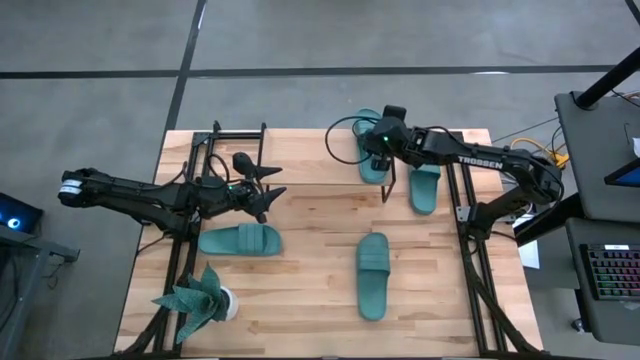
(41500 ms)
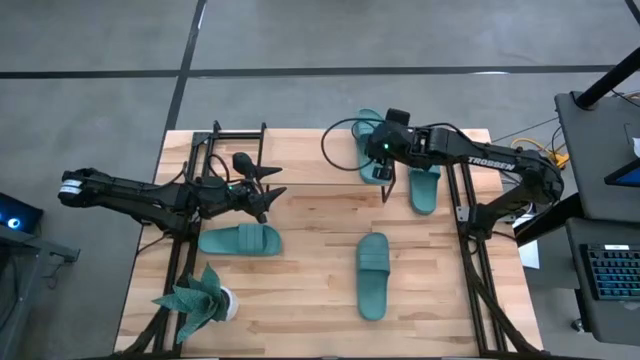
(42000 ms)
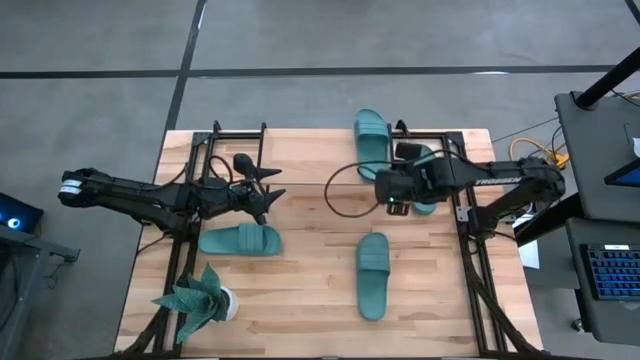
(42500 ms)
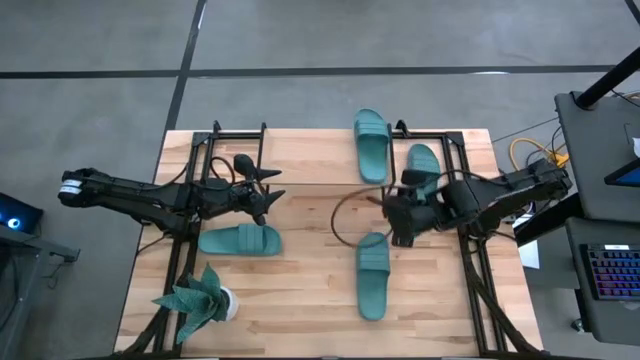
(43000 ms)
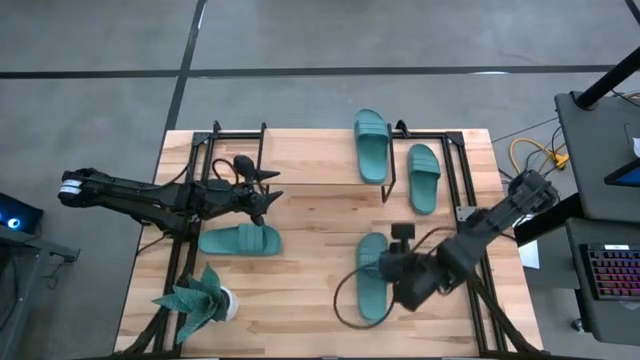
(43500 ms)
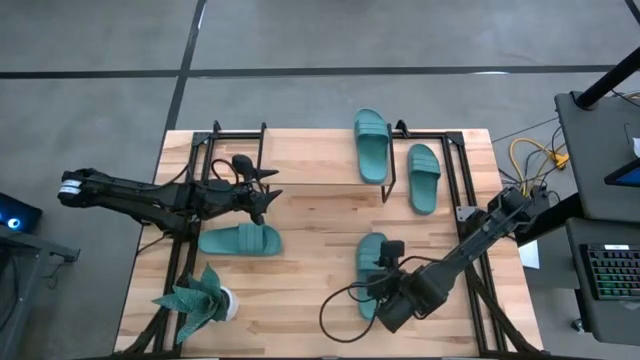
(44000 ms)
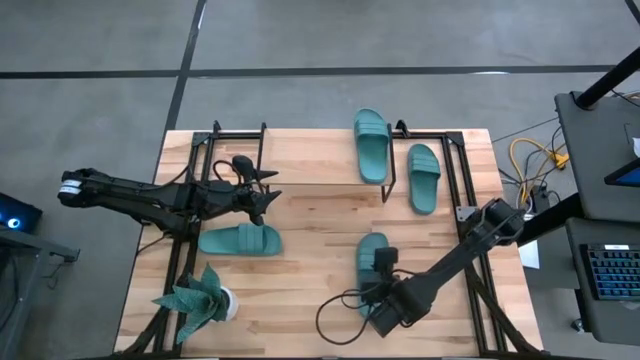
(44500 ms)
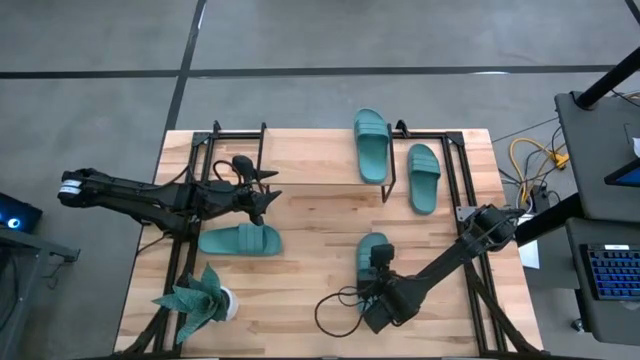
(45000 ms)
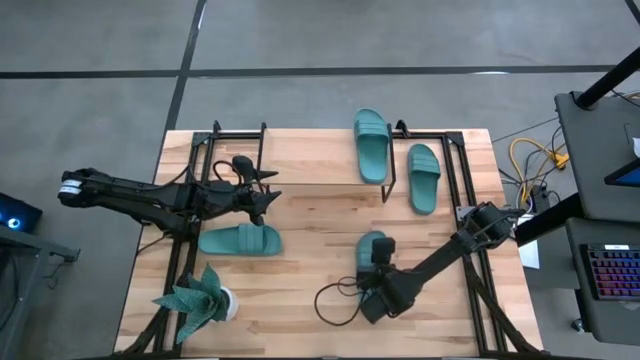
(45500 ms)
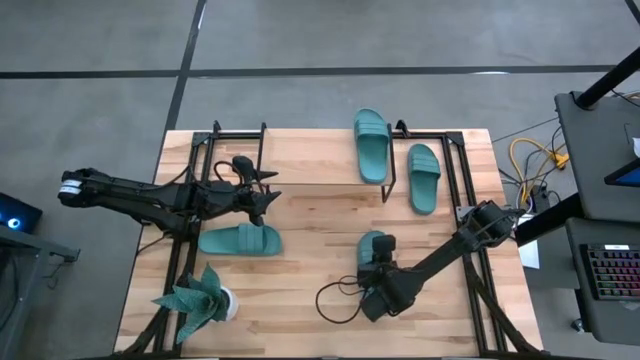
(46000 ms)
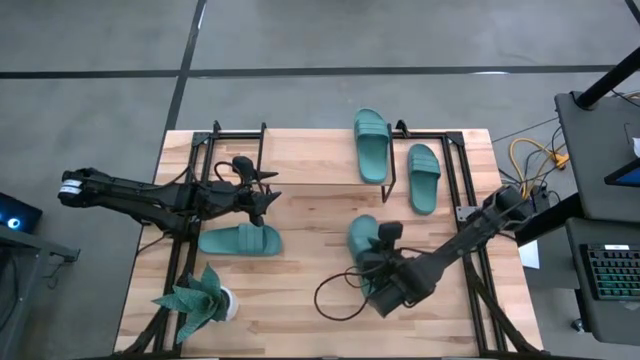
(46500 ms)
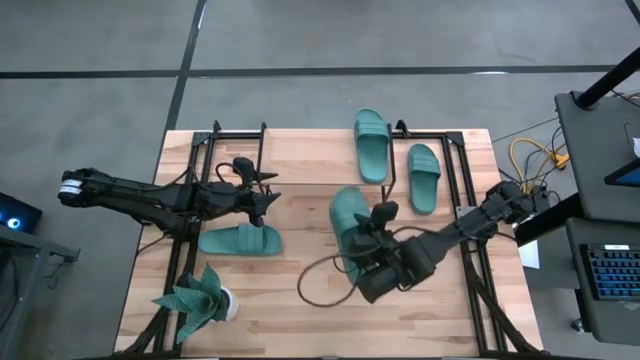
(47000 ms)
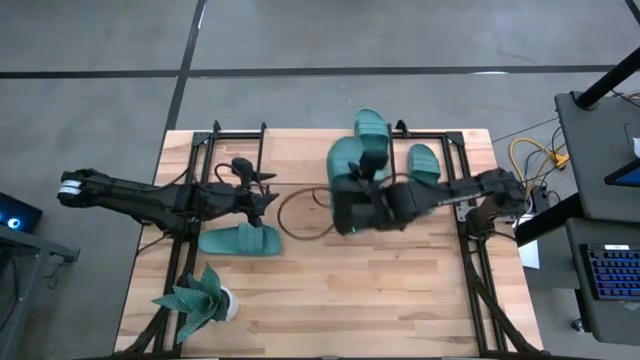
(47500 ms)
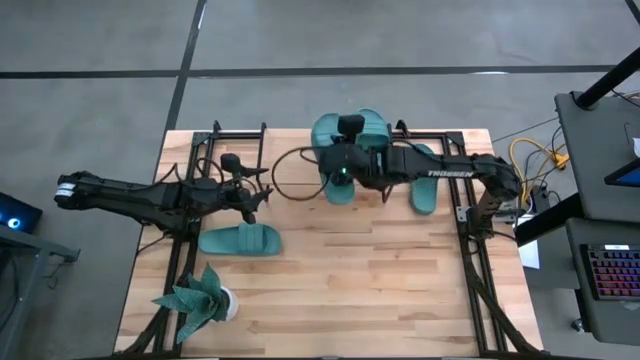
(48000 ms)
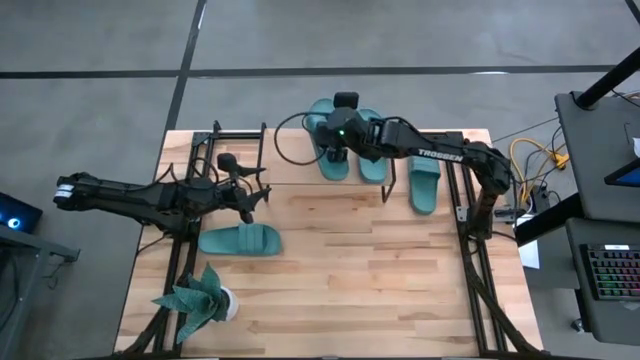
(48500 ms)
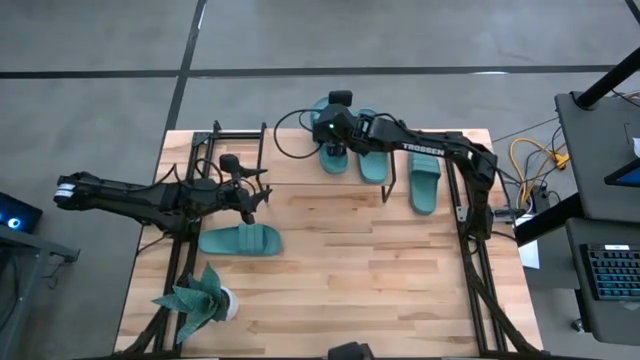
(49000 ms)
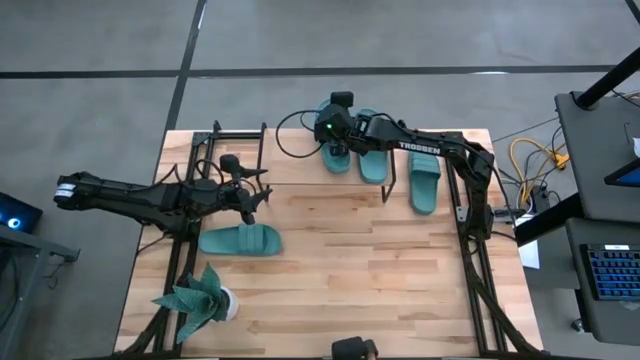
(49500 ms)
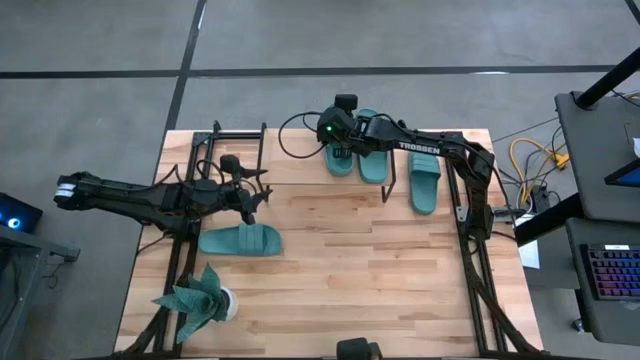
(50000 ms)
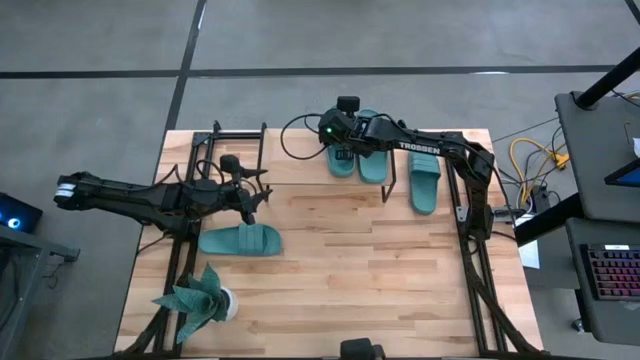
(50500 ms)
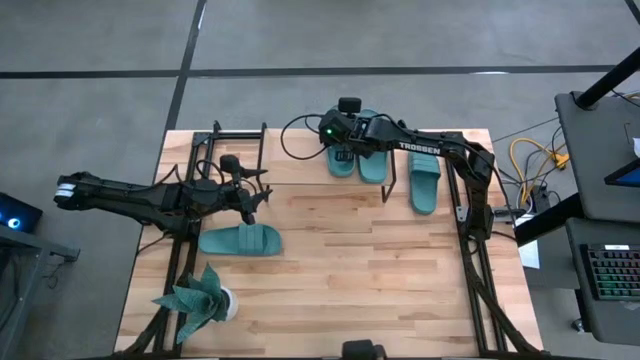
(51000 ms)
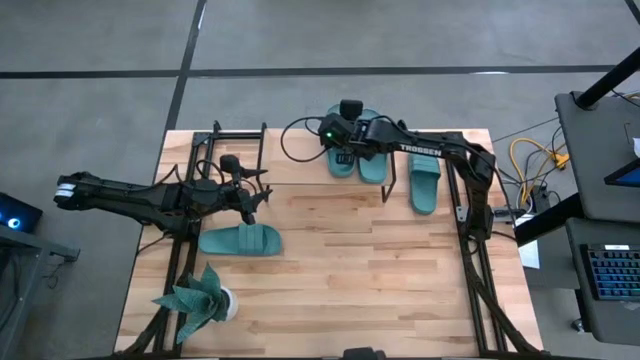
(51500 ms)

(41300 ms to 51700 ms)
Task: Pick and place slides into the shelf
Put the green slide on the shelf

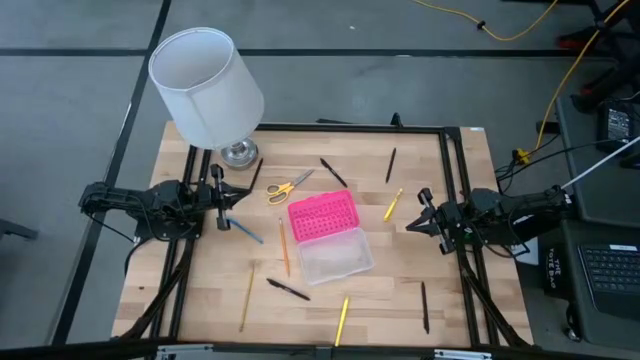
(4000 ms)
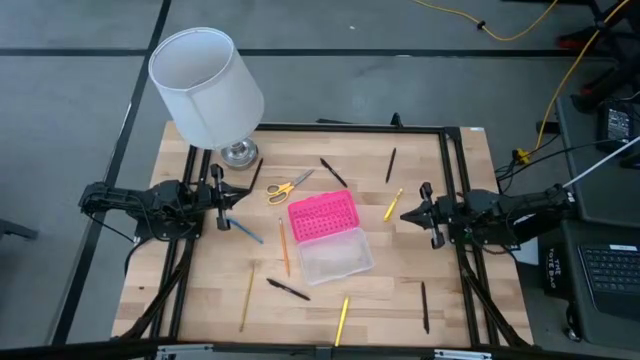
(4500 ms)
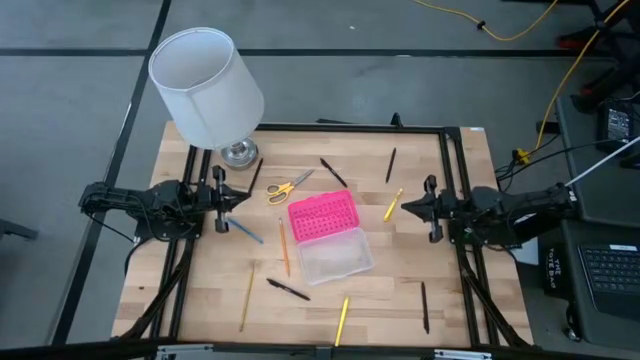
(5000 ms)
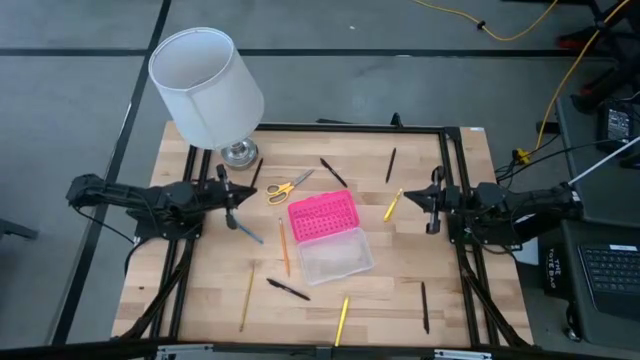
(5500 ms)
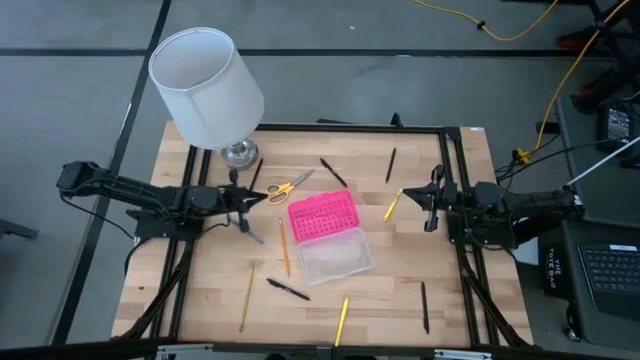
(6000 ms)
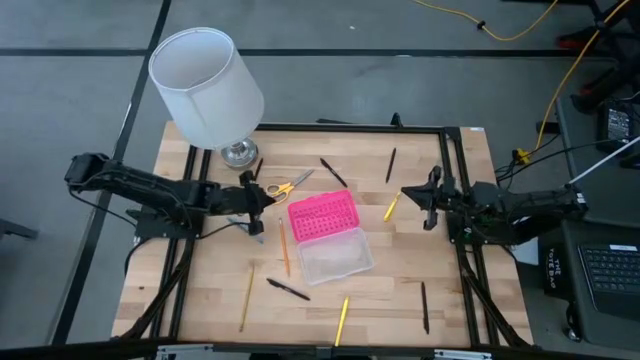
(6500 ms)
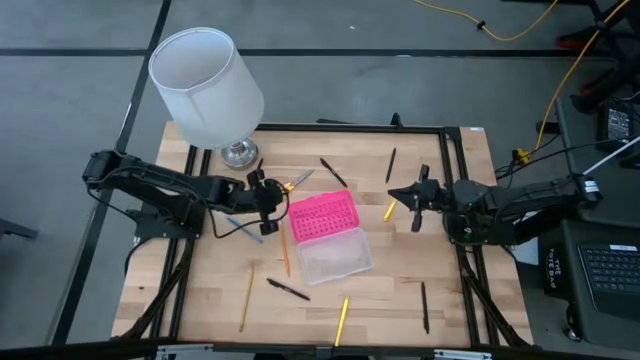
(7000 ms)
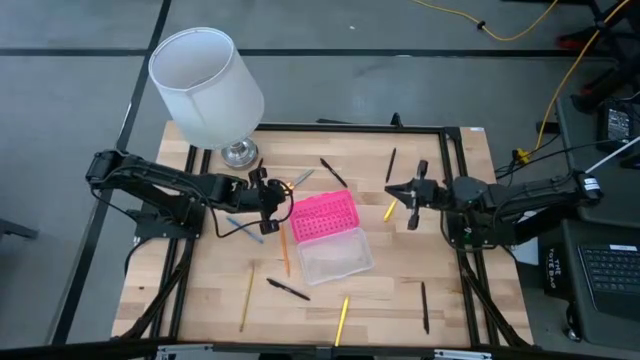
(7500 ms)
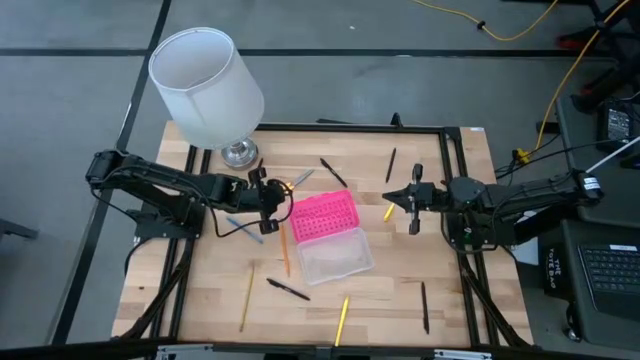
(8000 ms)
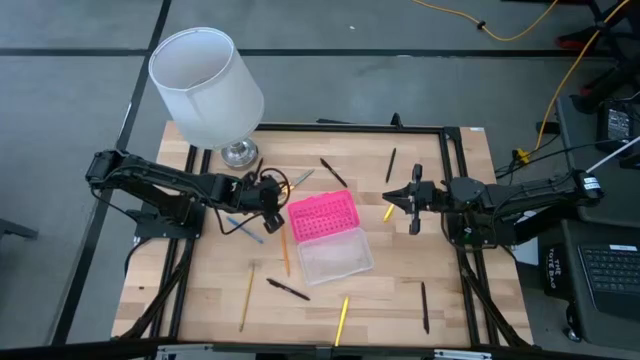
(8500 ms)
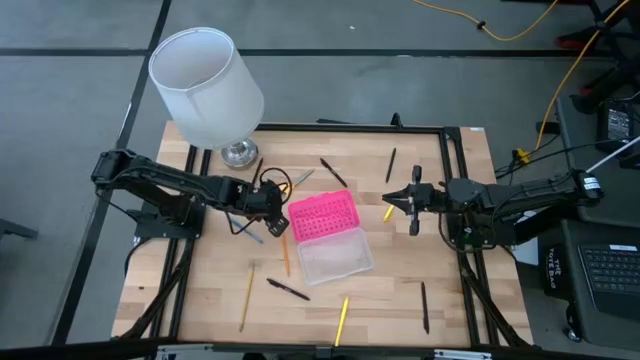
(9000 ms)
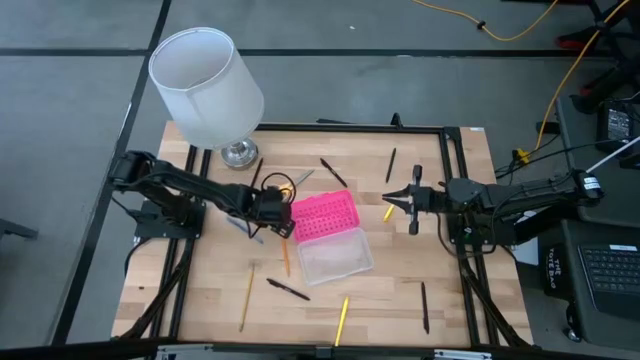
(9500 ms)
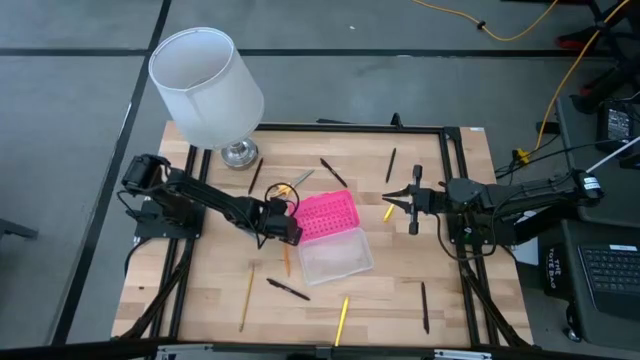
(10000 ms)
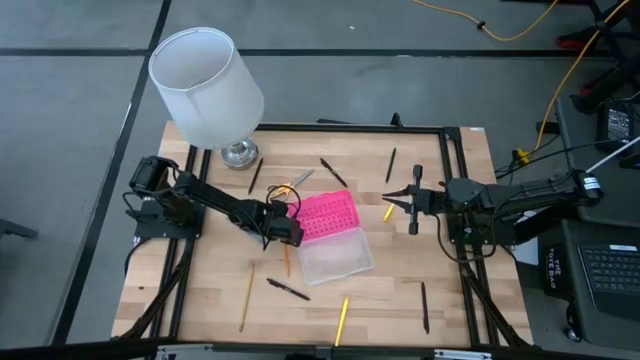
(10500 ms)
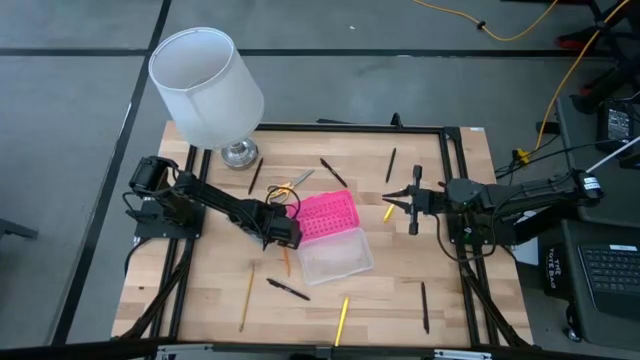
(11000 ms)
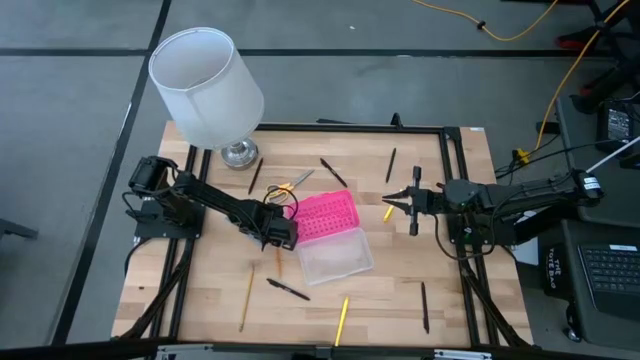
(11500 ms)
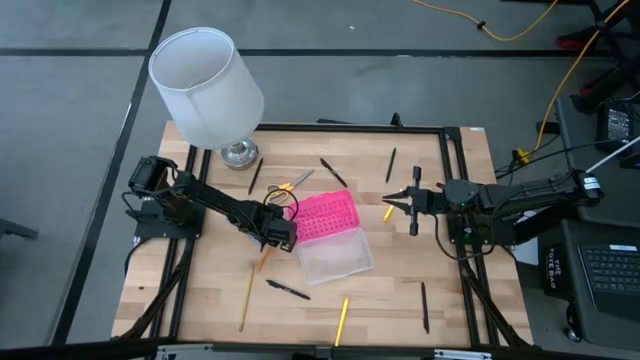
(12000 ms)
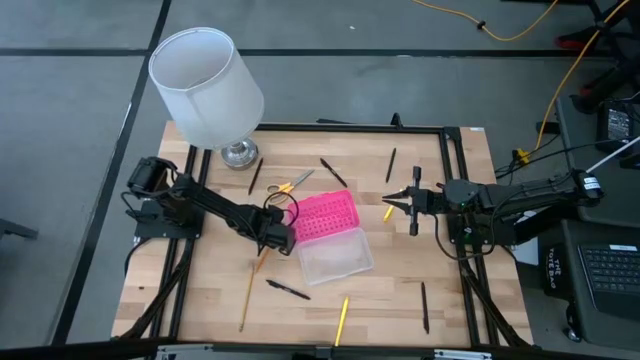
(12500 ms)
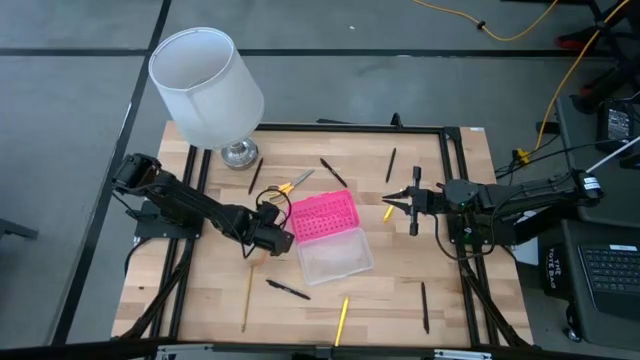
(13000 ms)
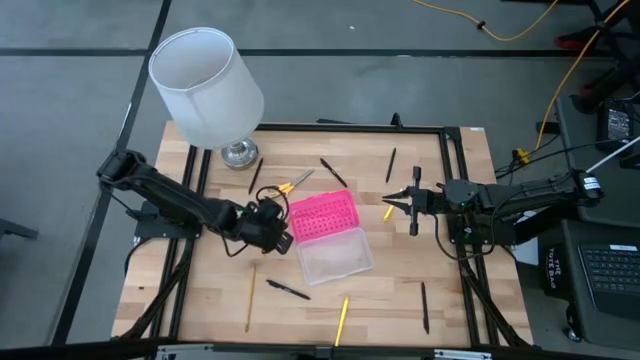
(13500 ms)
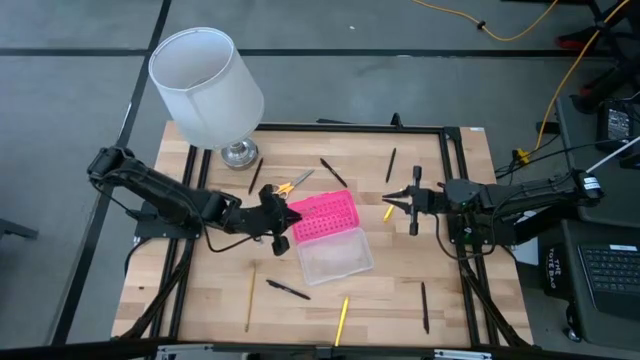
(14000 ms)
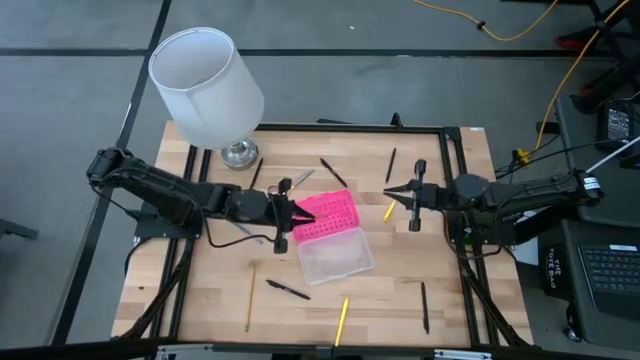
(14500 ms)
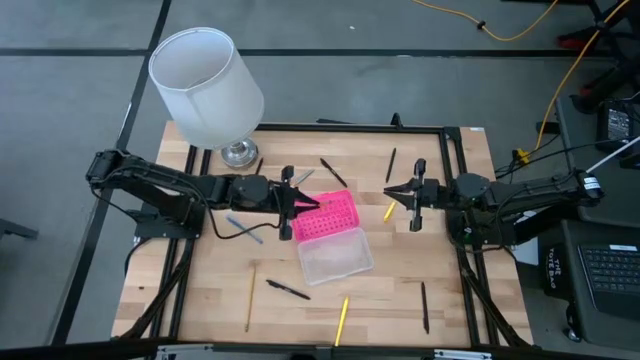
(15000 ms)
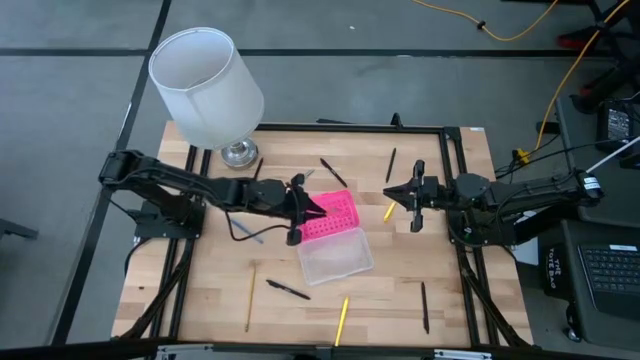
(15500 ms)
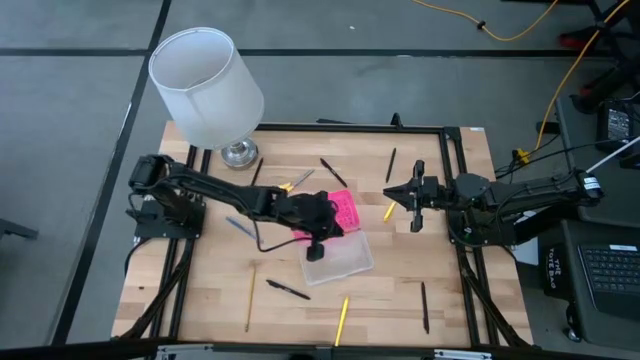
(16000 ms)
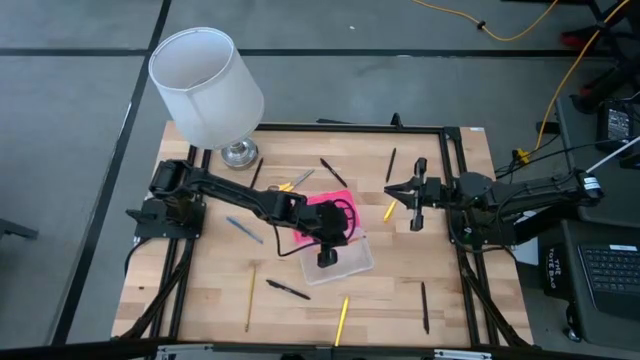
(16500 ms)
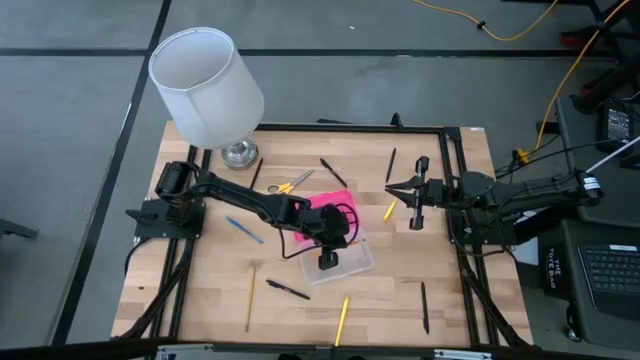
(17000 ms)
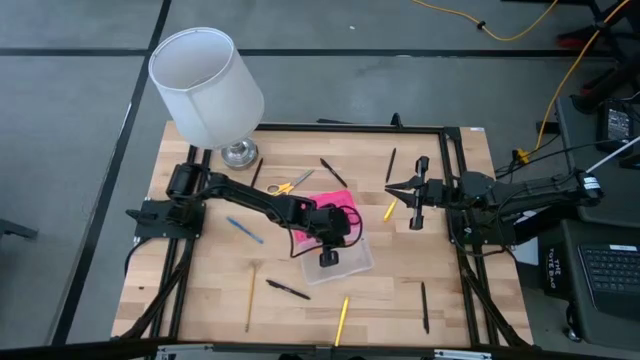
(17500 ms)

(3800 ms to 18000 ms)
Task: Pick & place school supplies into a supply box
Put the orange pencil into the pink supply box
